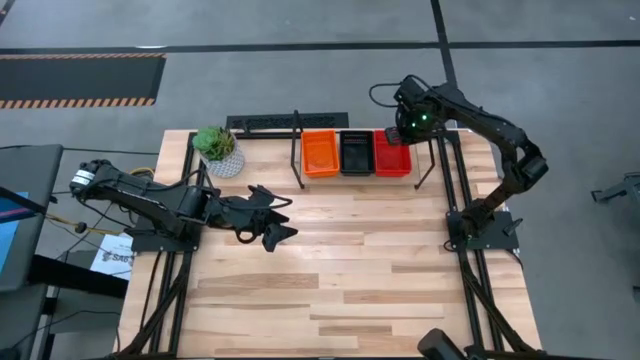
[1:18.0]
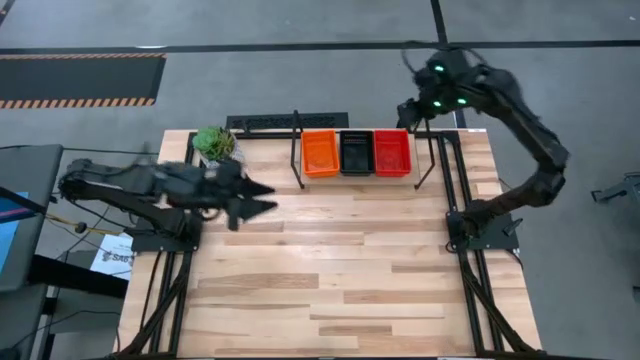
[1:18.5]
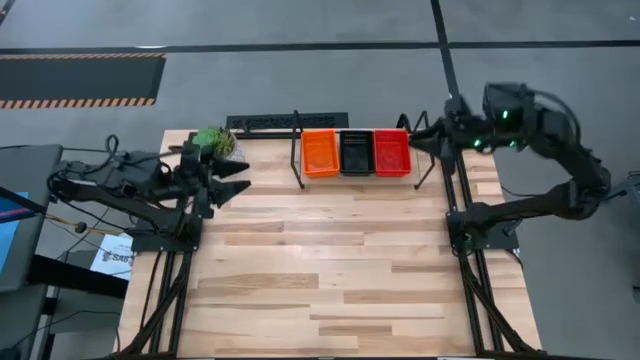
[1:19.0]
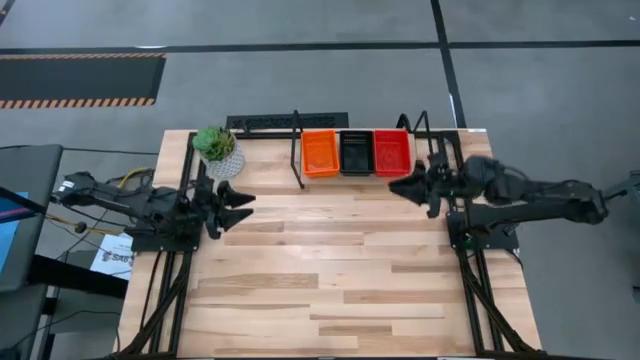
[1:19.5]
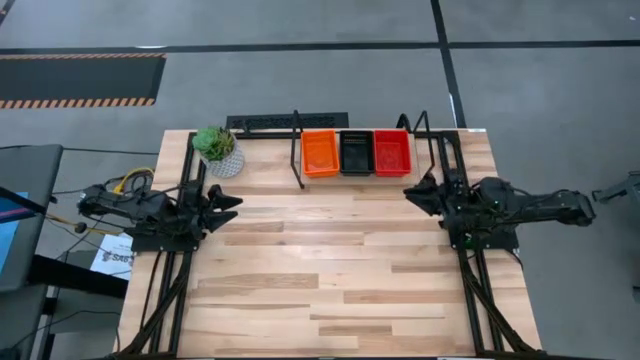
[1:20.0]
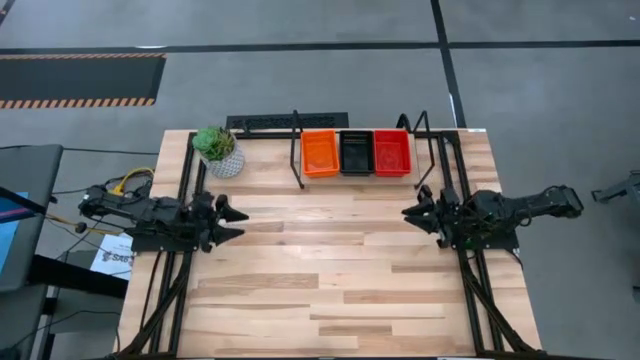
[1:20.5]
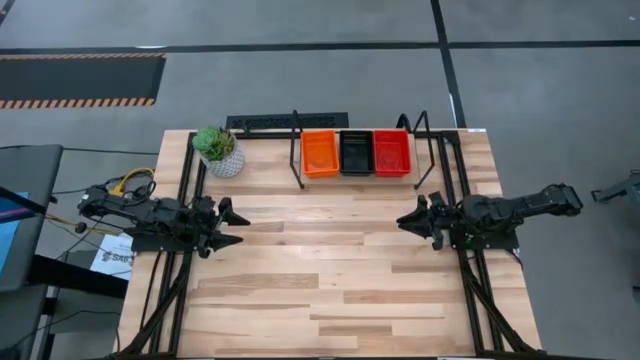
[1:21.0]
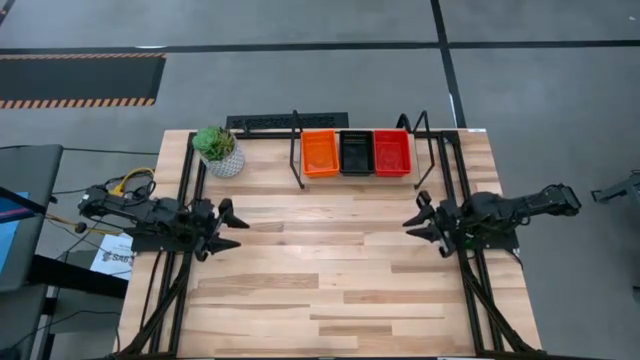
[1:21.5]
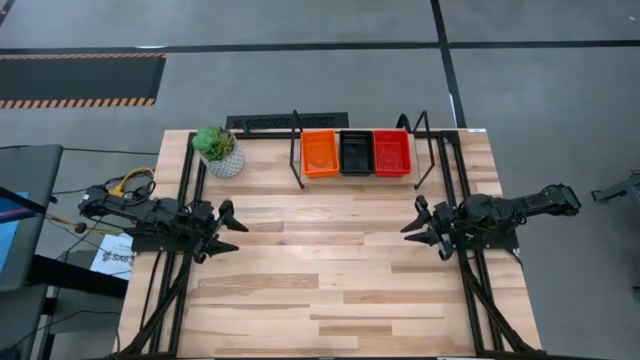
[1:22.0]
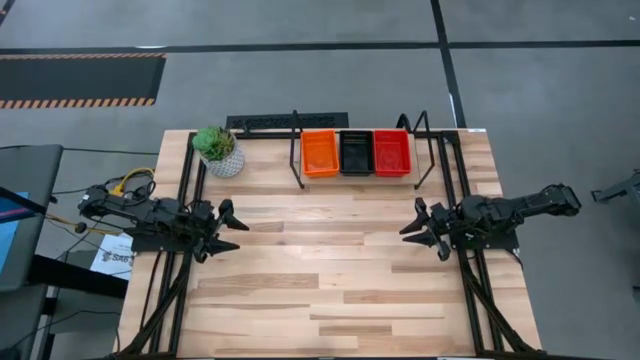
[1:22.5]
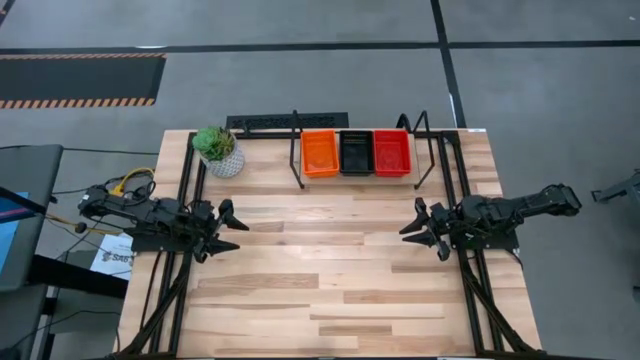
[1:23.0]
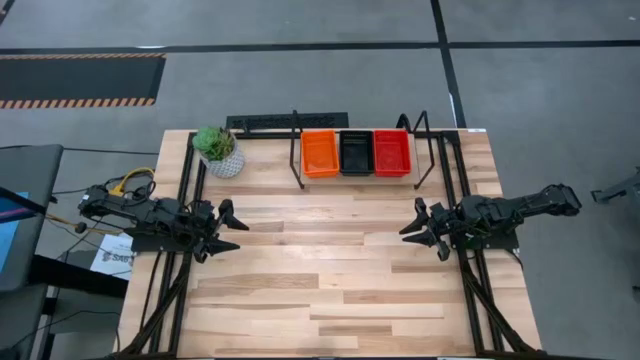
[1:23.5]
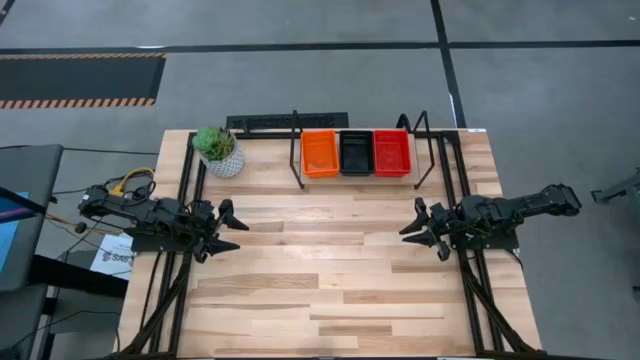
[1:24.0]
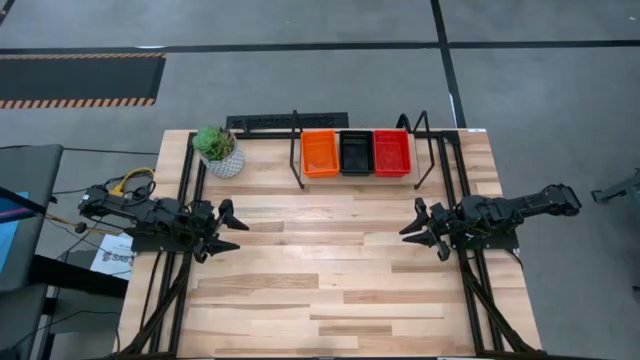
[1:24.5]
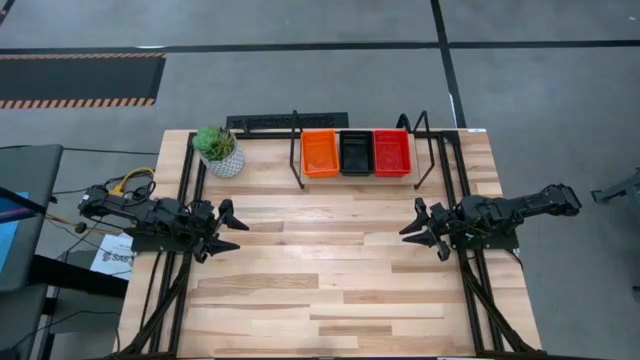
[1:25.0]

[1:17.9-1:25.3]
Task: Stack baskets on shelf by color
Return to Home Position

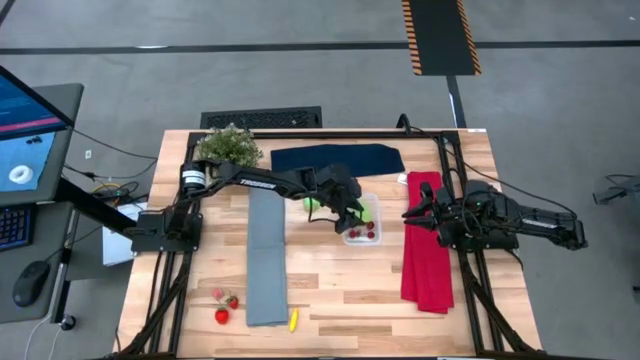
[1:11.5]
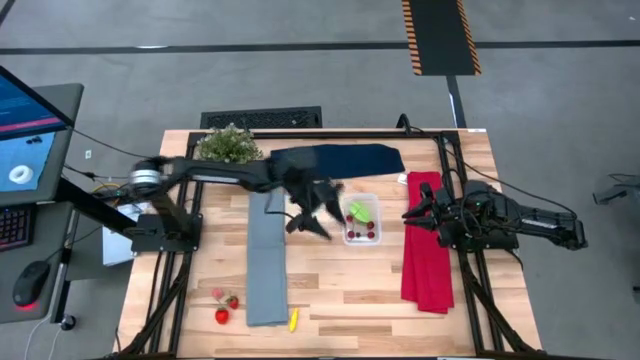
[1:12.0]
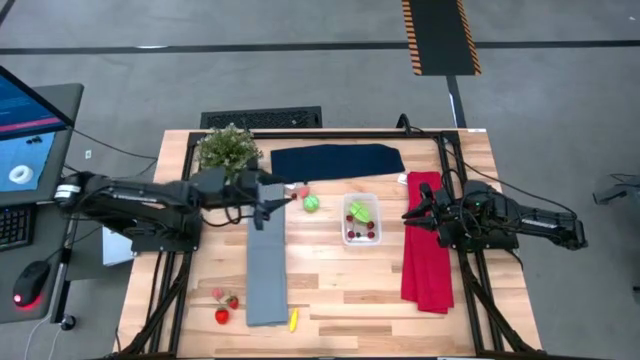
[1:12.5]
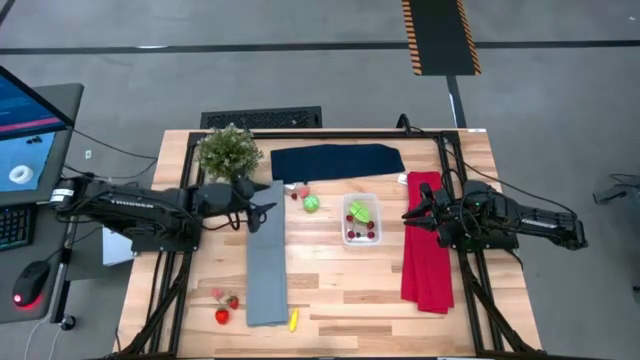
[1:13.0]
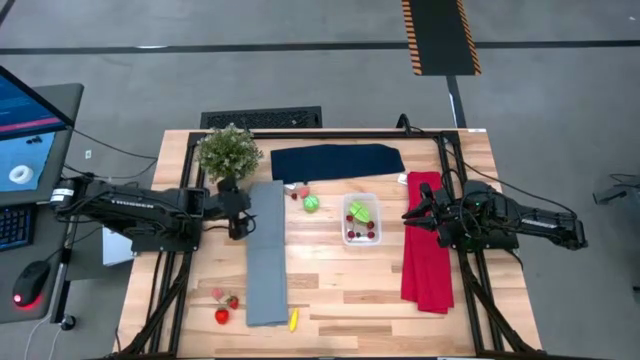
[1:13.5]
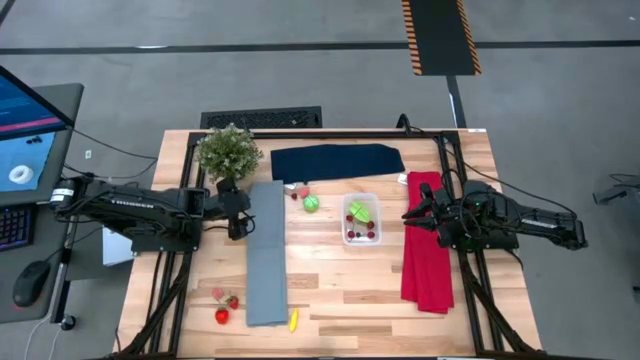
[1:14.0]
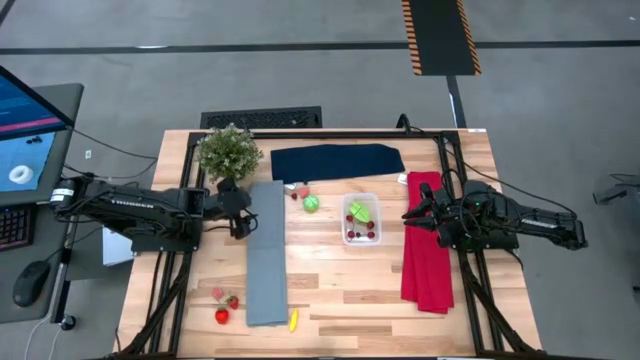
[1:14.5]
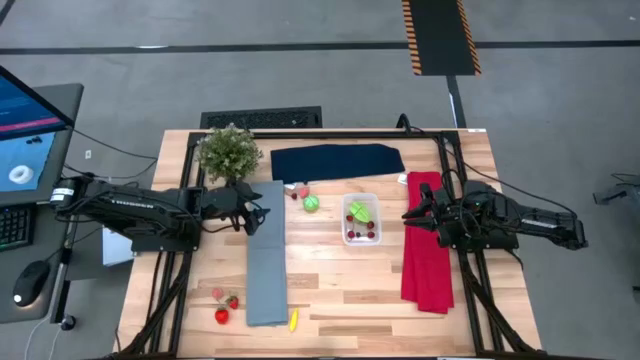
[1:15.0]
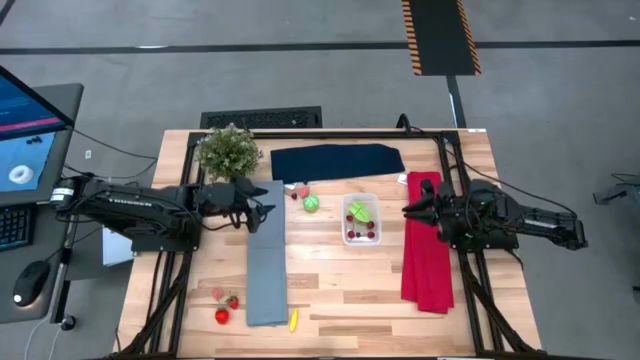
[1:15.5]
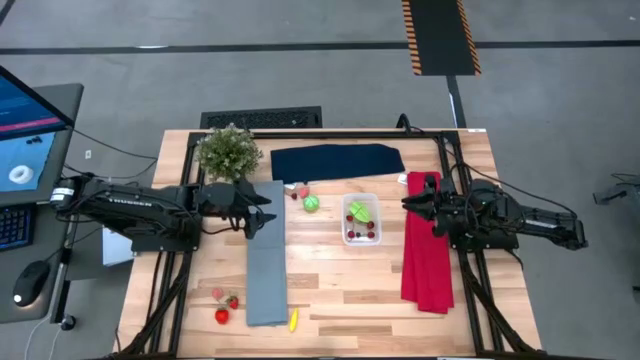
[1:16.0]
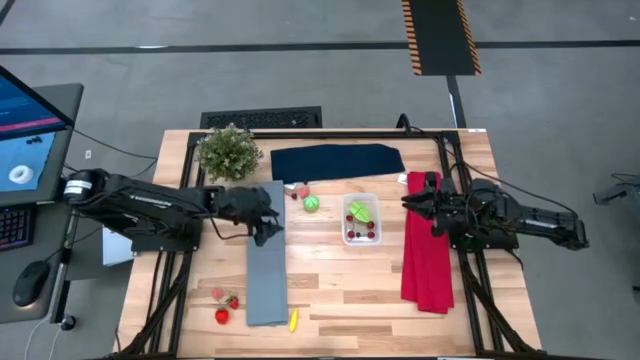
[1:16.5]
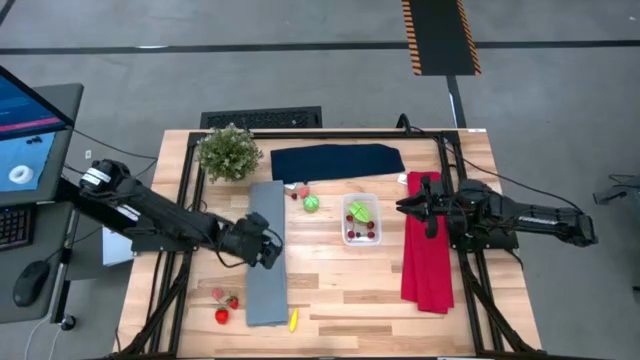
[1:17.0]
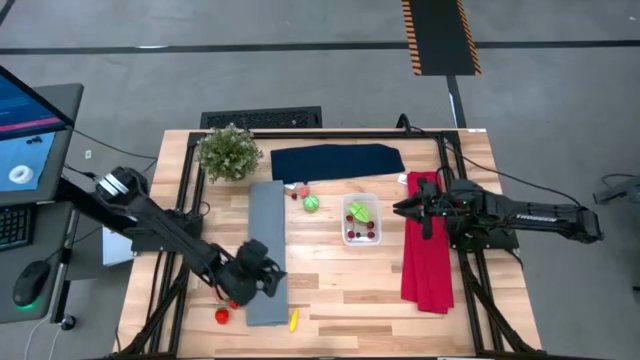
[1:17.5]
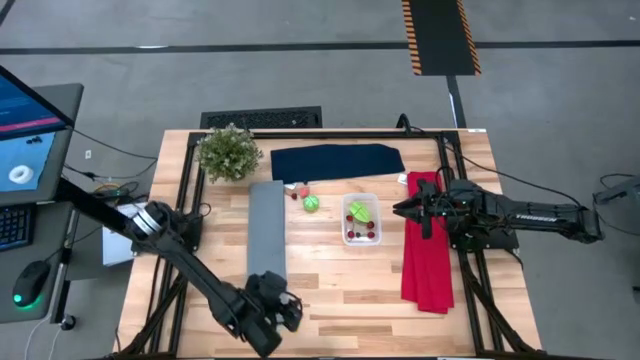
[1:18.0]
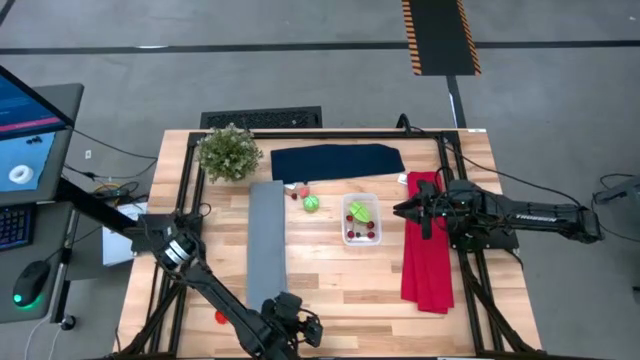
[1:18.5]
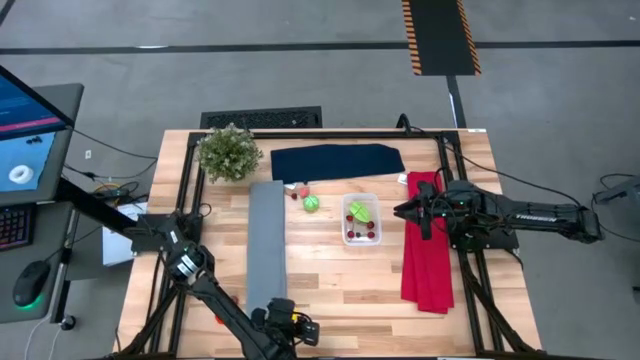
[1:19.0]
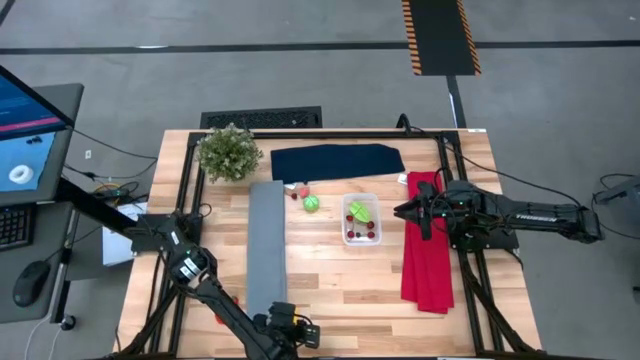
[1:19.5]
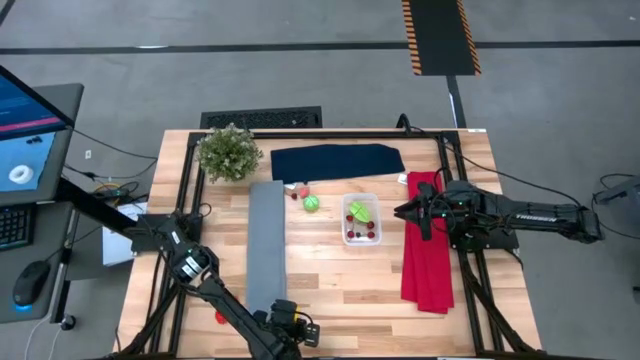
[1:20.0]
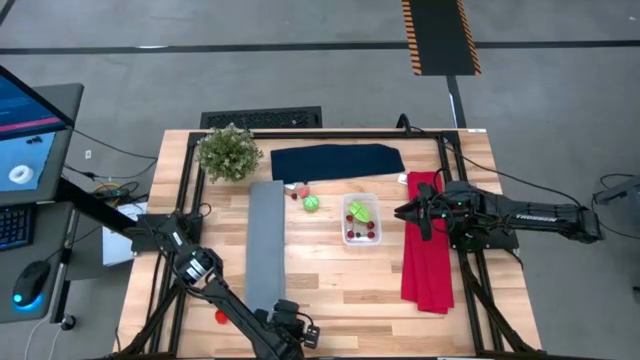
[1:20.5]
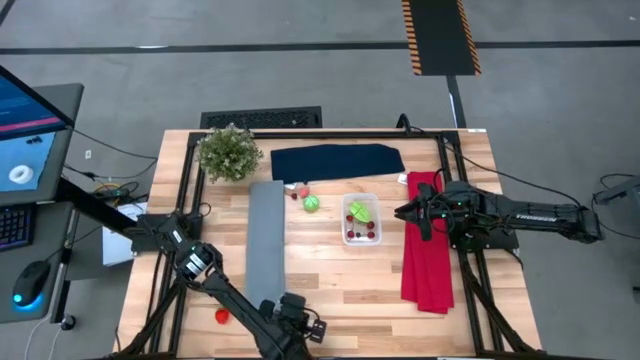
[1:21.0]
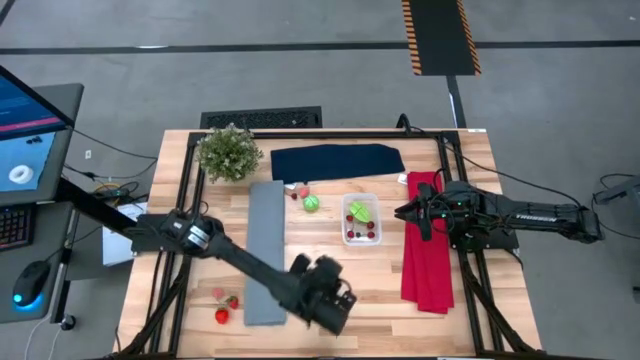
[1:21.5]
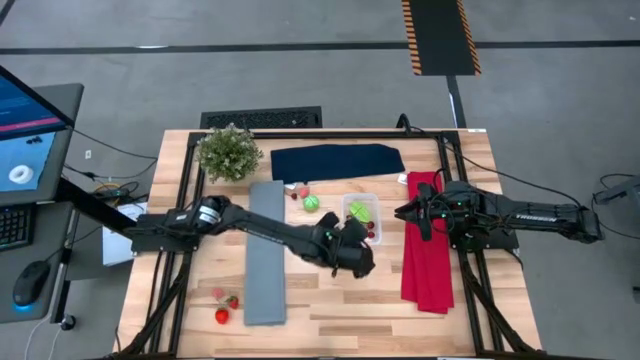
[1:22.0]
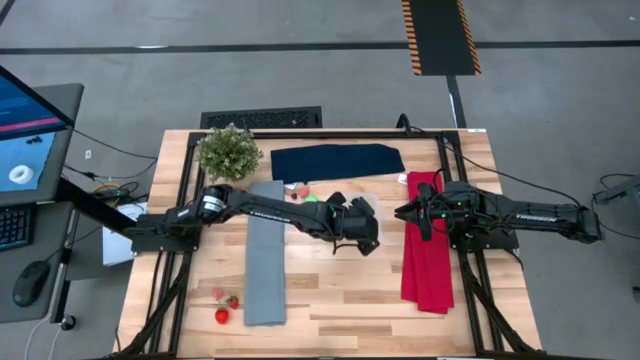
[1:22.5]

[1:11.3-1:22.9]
Task: Pick and placing Produce into tupperware
Put the yellow corn into the transparent bin
